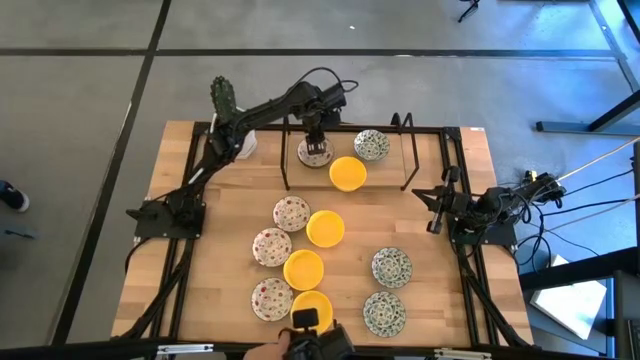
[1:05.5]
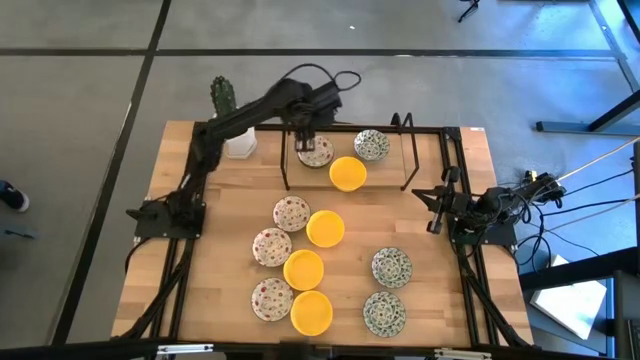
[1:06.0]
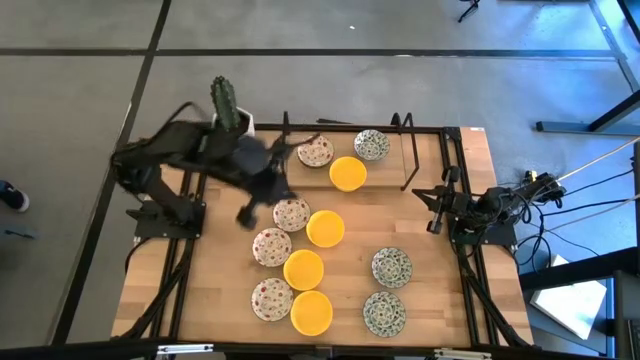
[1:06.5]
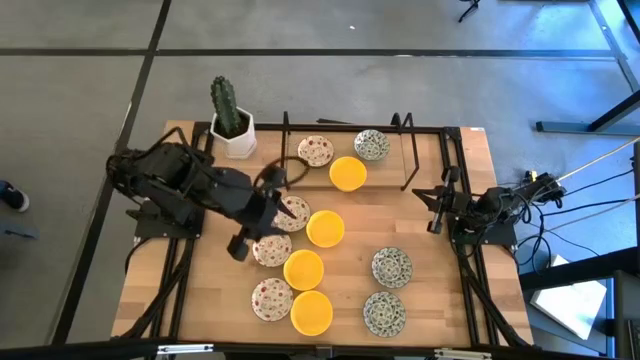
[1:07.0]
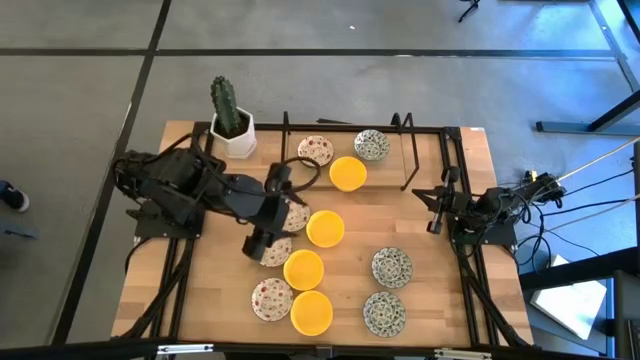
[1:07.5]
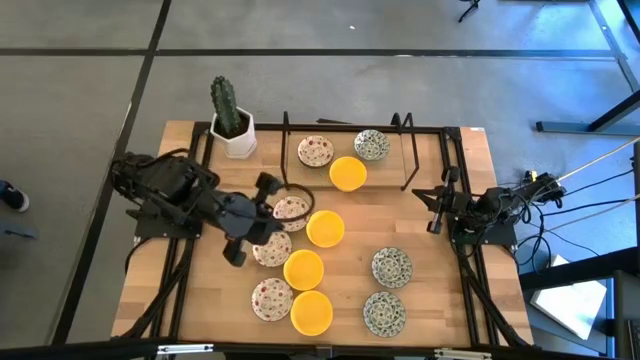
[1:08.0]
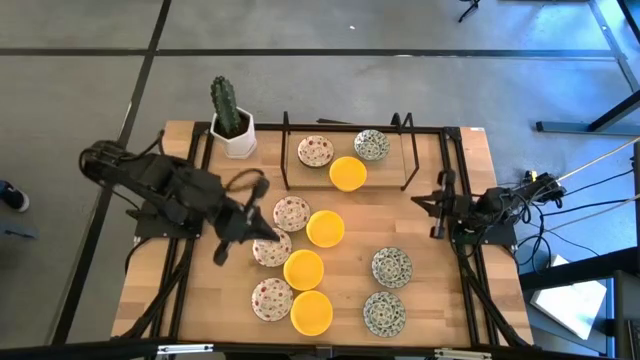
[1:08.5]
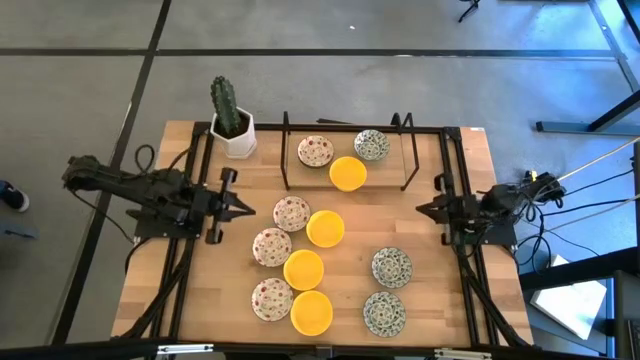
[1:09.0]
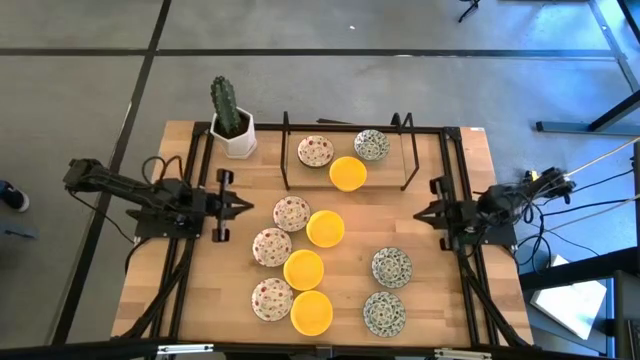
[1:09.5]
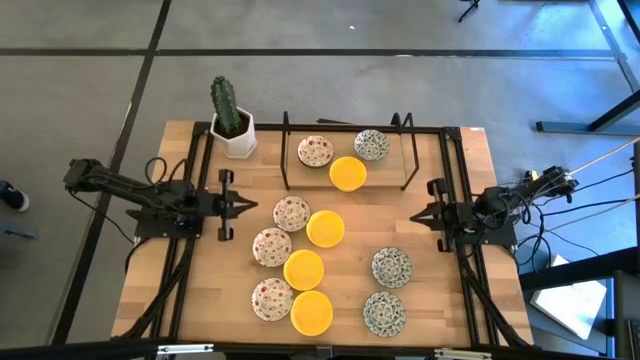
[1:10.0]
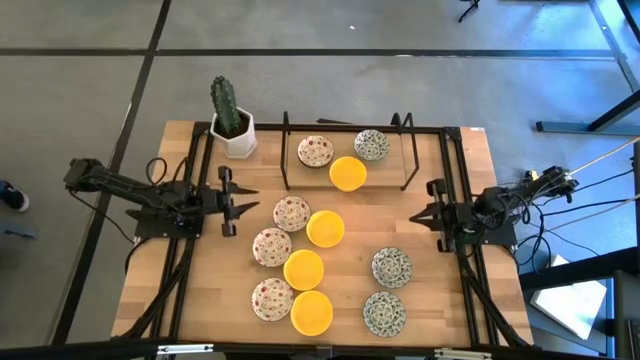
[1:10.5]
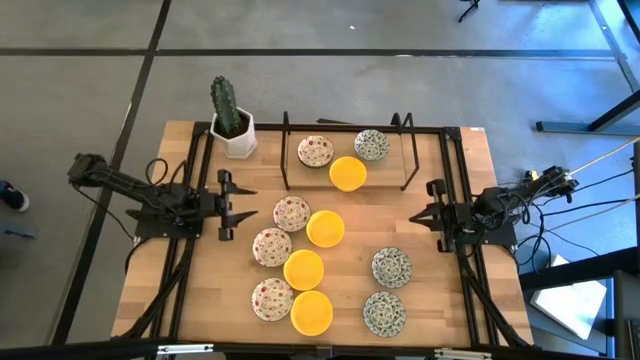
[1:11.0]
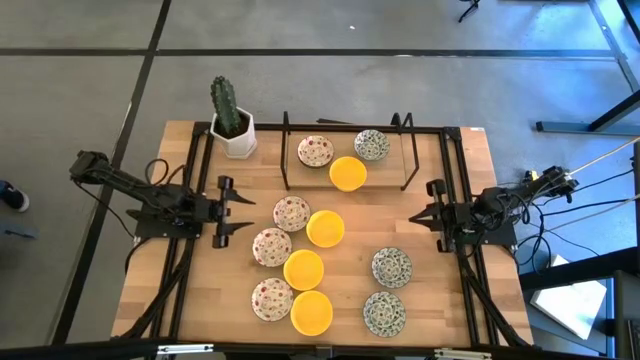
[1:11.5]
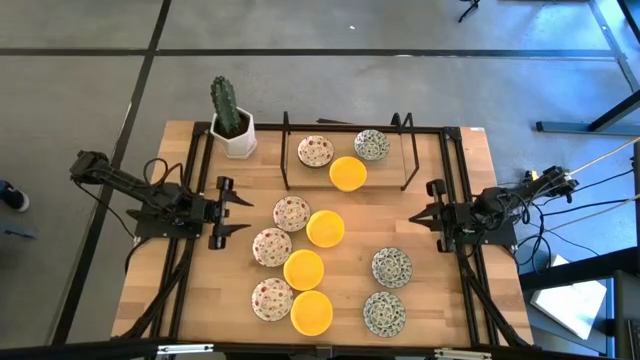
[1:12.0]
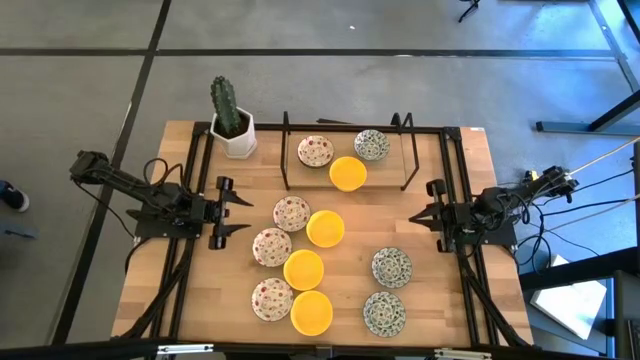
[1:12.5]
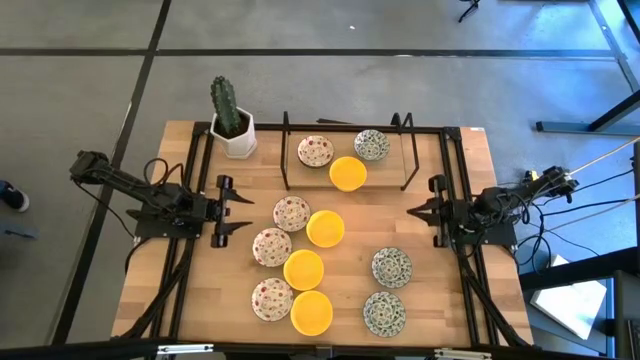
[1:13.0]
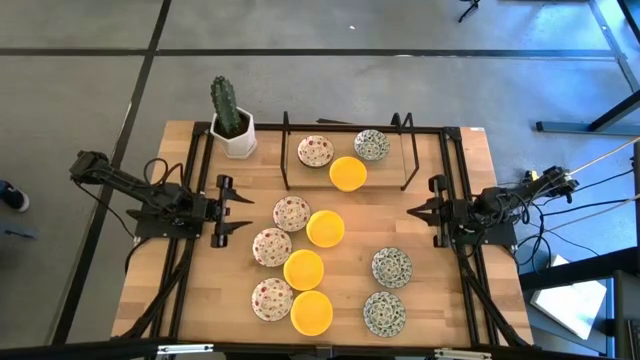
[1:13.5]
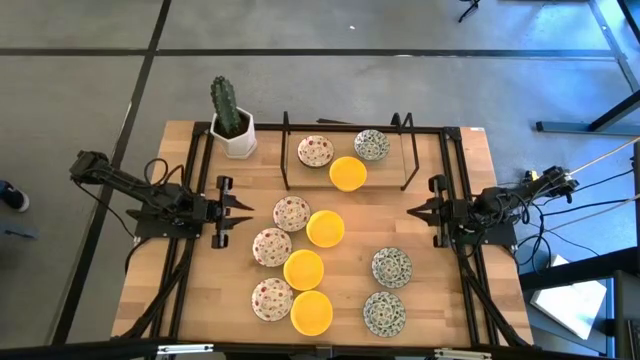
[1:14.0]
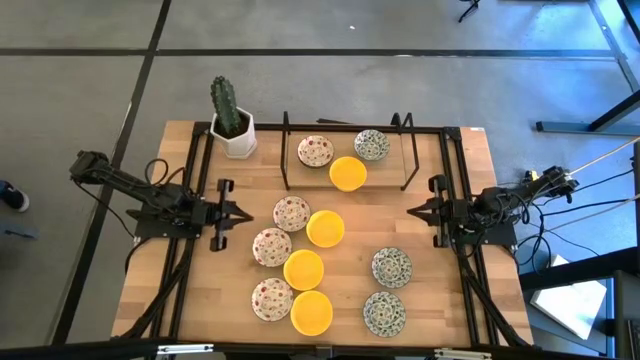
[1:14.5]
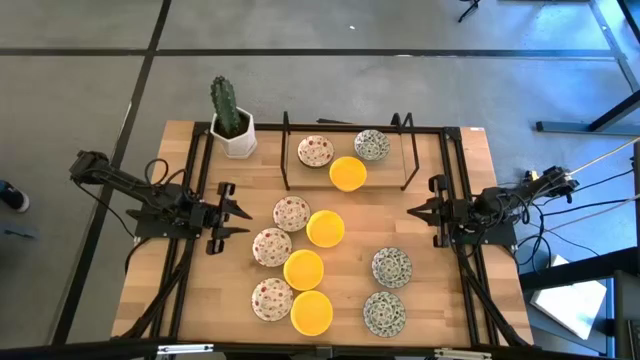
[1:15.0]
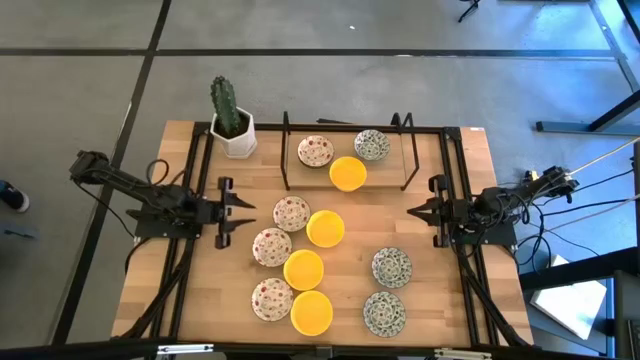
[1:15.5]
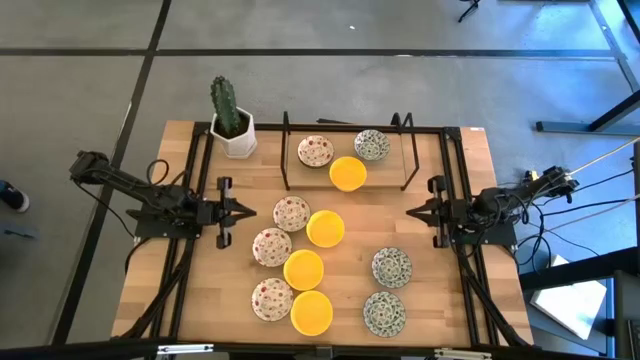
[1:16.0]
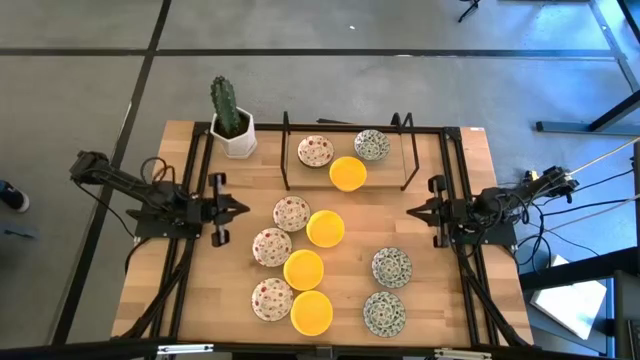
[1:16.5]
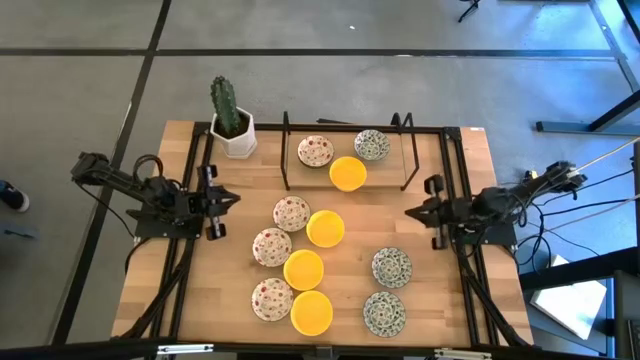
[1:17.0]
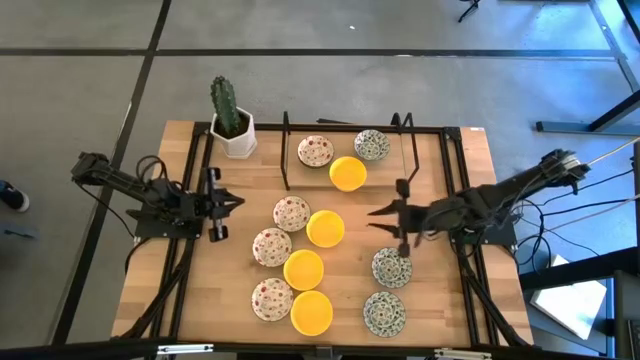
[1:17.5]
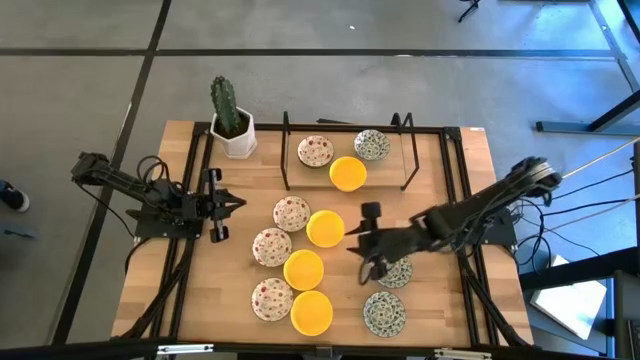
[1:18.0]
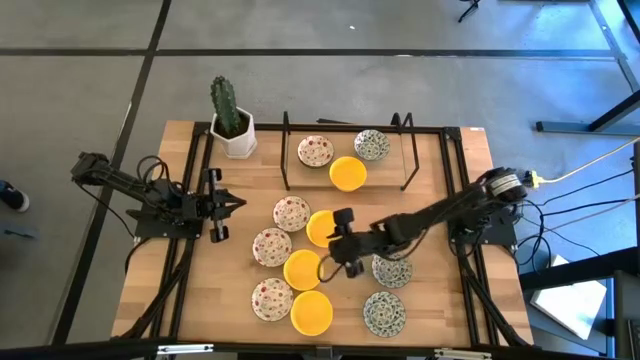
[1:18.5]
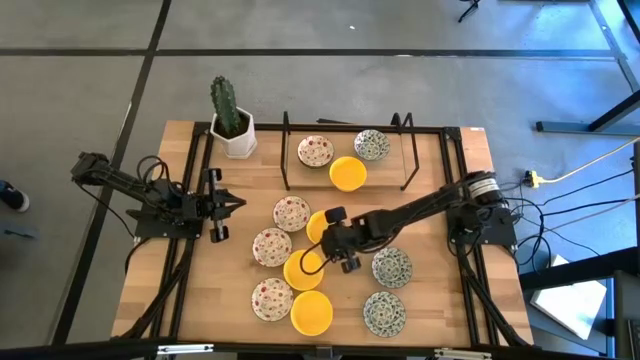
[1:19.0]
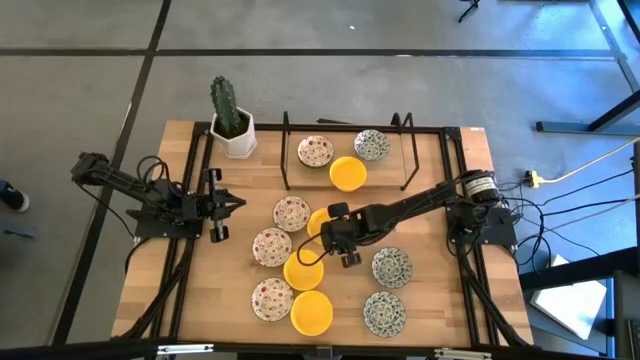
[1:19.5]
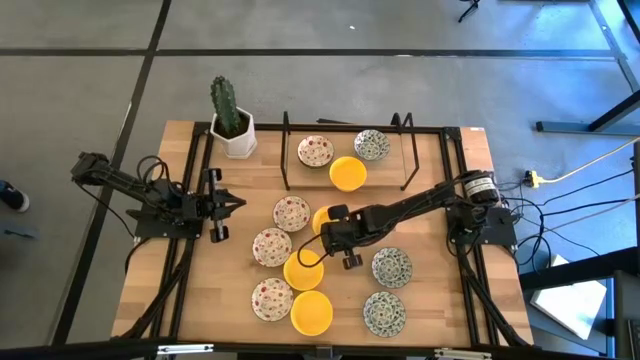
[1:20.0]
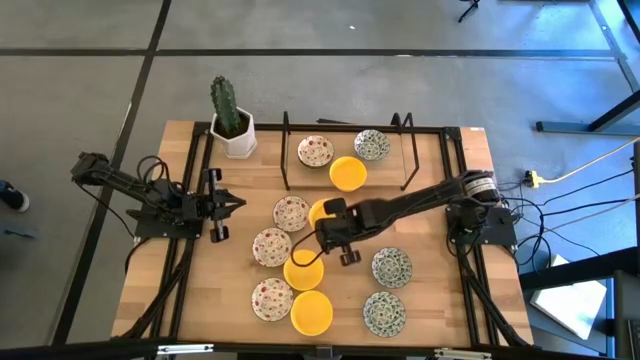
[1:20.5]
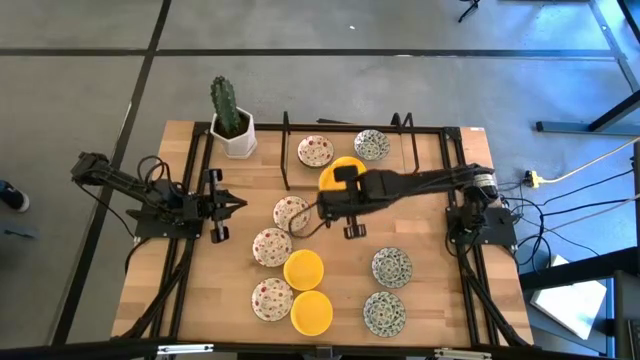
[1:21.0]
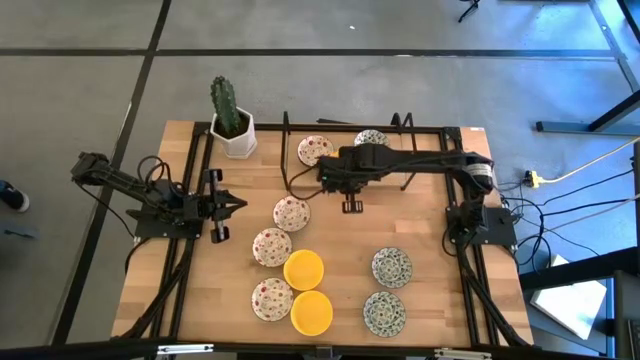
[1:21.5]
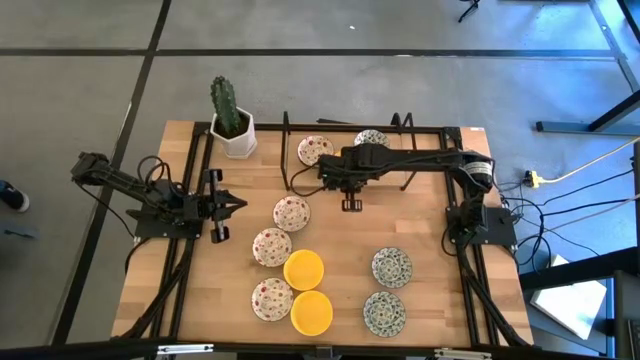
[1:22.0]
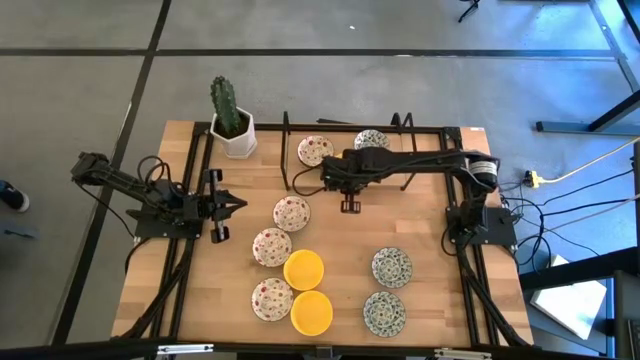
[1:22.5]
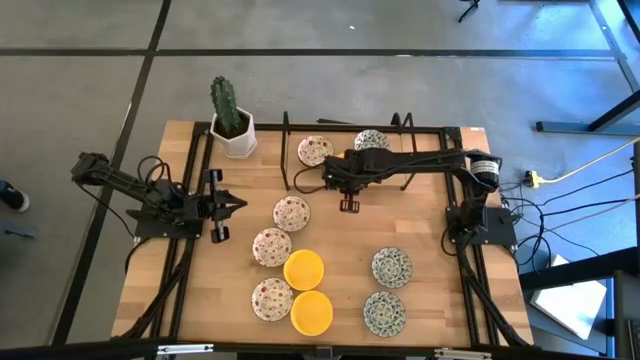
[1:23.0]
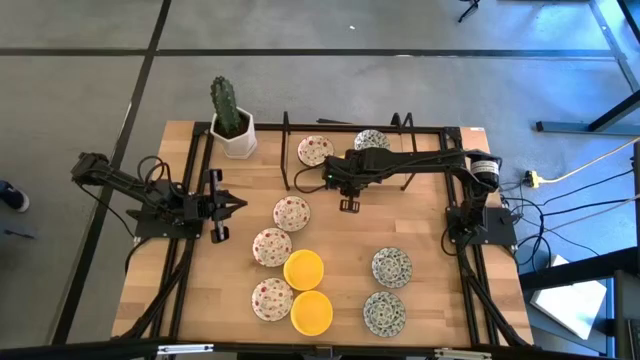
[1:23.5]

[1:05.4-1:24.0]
Task: Pick & Place Mini bowls
Stack the yellow bowl on the yellow bowl on the shelf

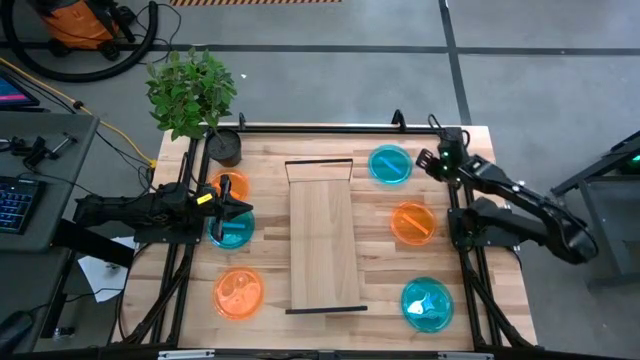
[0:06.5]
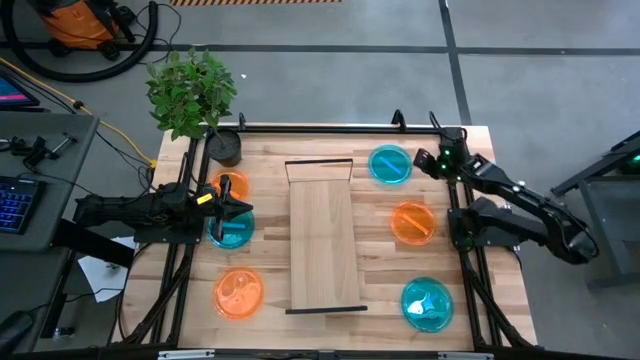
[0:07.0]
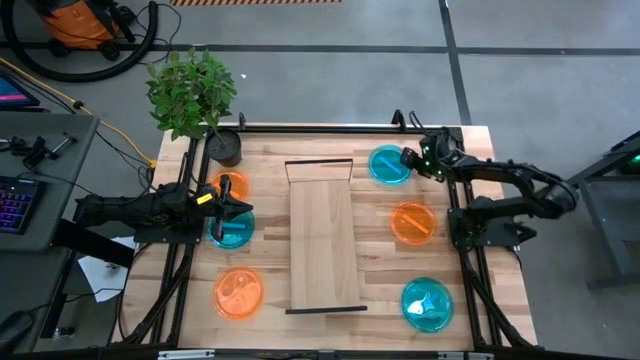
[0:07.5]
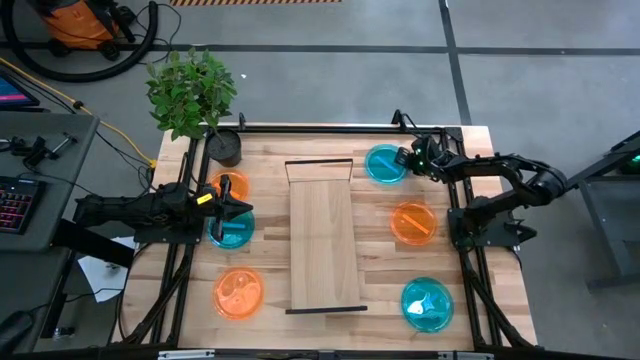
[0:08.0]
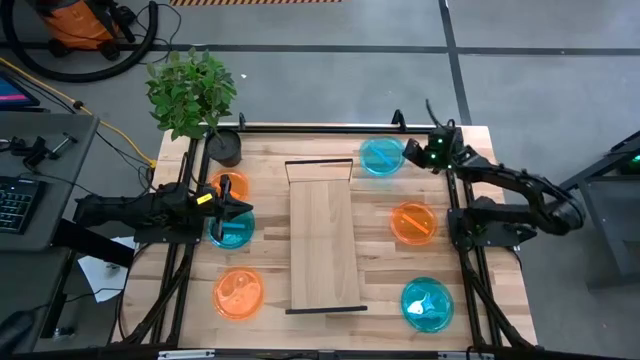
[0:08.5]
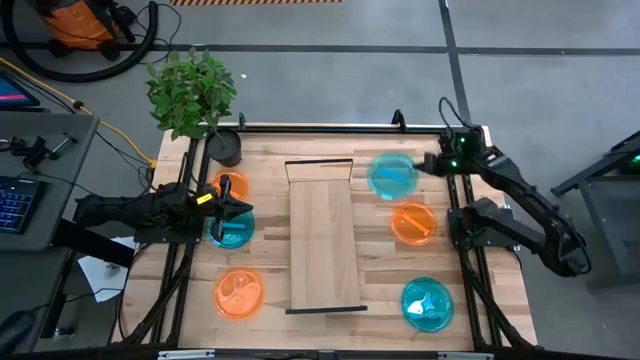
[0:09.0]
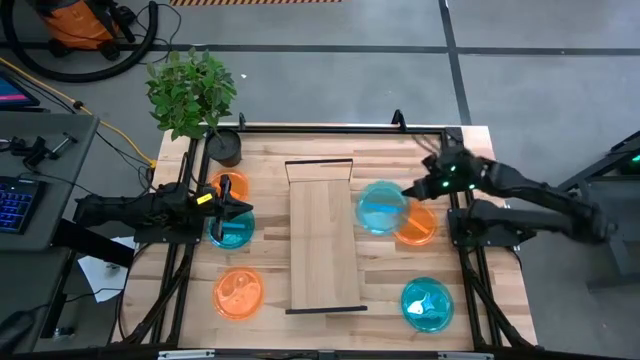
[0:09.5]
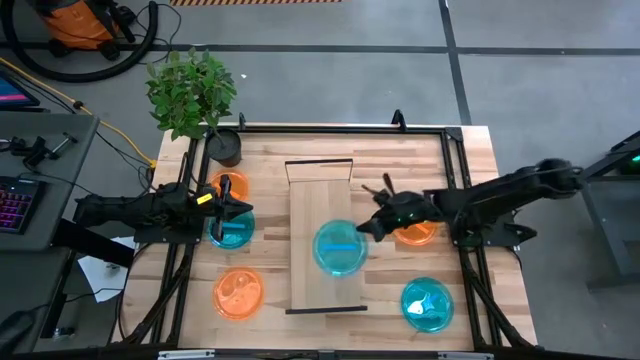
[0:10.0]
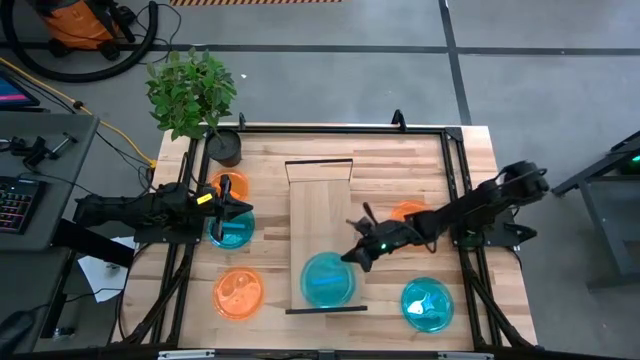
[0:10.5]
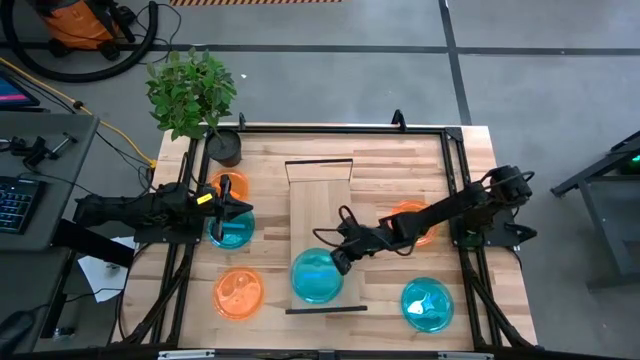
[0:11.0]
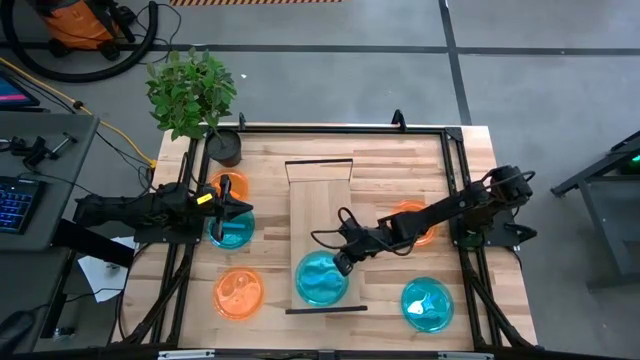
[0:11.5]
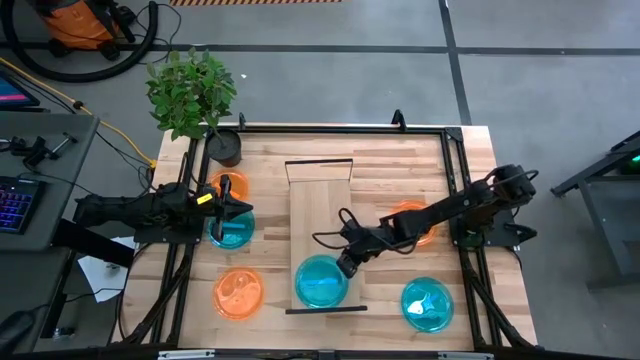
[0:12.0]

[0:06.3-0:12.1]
Task: Place and stack plates onto a shelf
Put the top right blue transparent plate on the shelf
